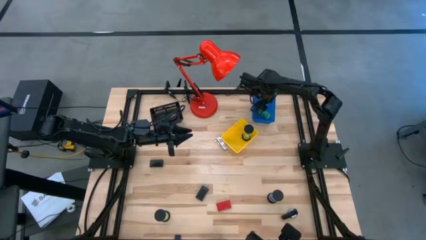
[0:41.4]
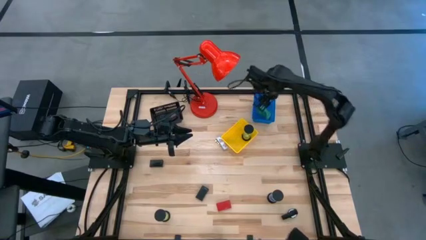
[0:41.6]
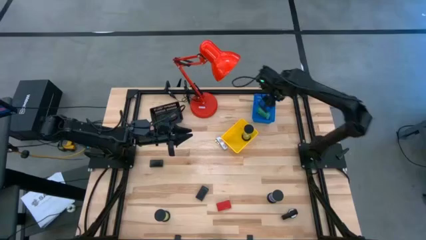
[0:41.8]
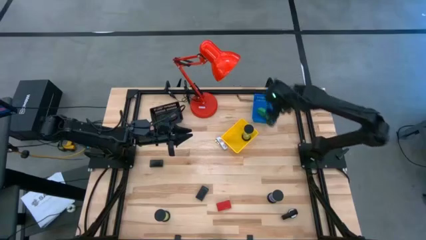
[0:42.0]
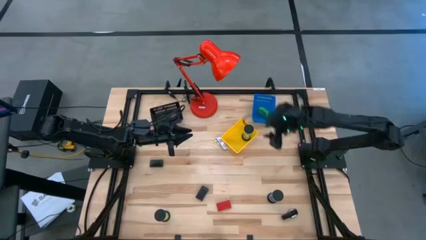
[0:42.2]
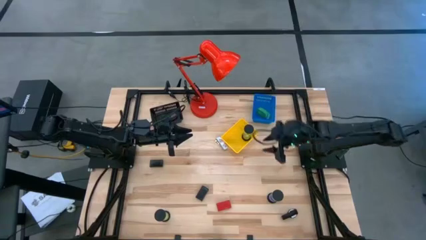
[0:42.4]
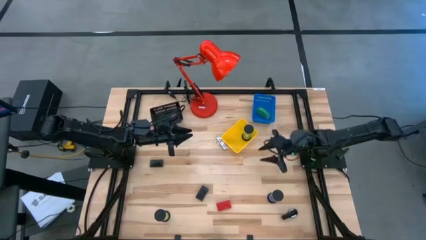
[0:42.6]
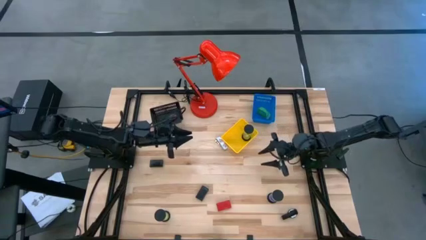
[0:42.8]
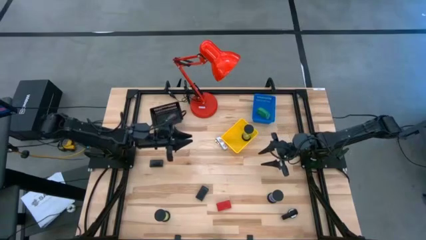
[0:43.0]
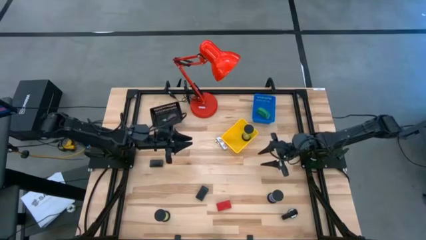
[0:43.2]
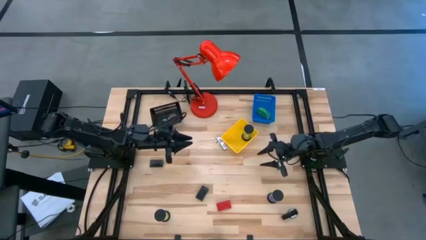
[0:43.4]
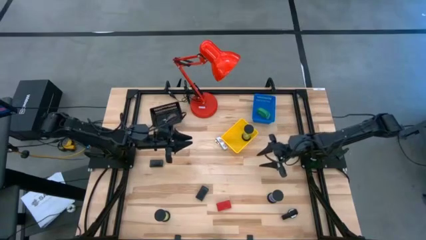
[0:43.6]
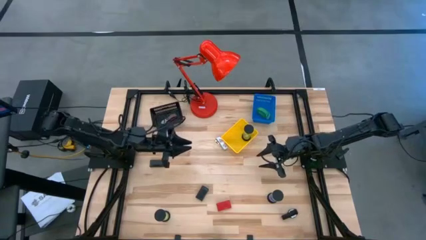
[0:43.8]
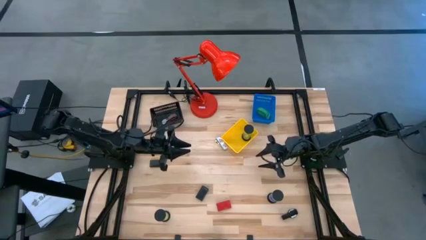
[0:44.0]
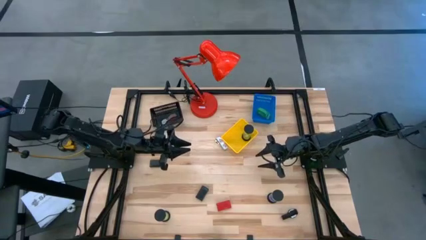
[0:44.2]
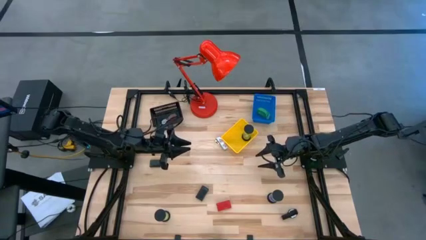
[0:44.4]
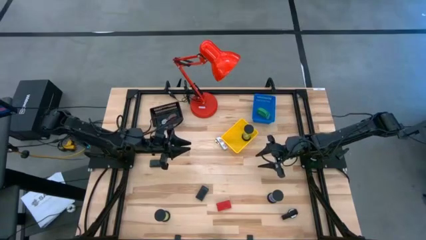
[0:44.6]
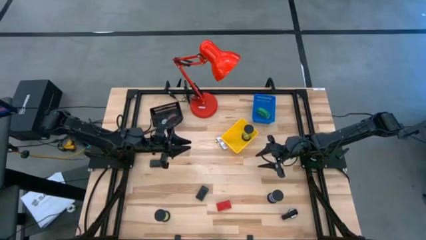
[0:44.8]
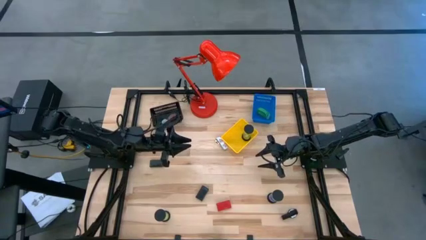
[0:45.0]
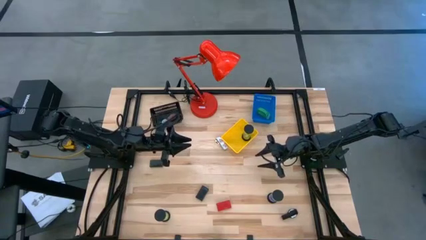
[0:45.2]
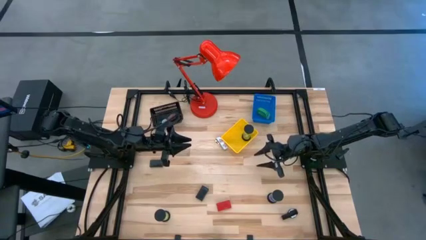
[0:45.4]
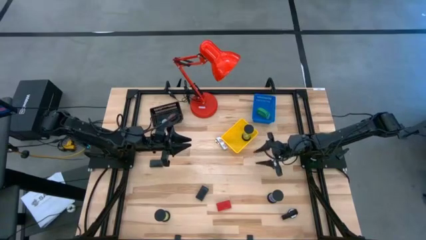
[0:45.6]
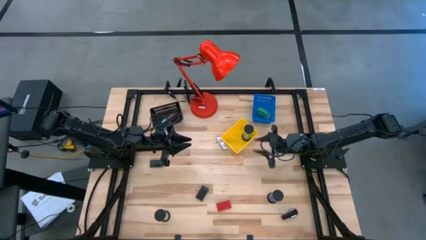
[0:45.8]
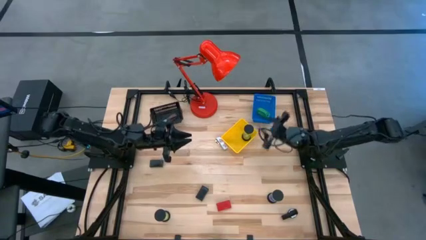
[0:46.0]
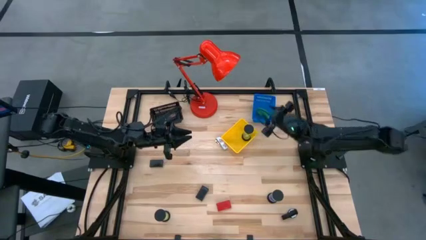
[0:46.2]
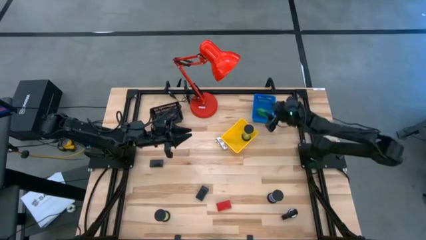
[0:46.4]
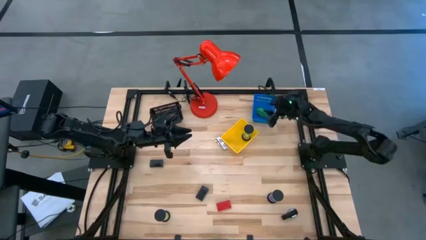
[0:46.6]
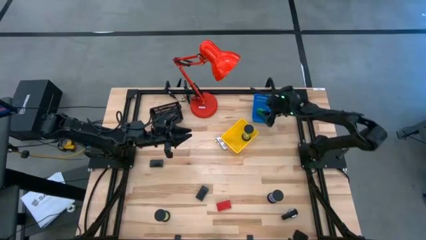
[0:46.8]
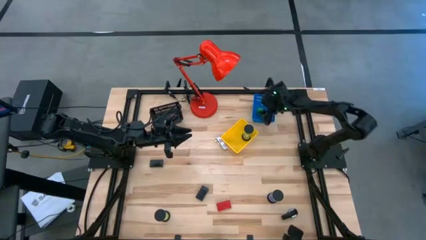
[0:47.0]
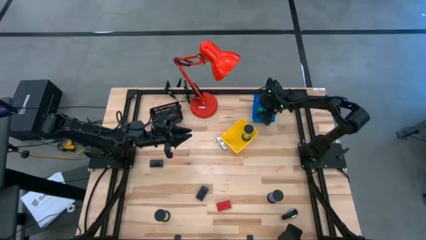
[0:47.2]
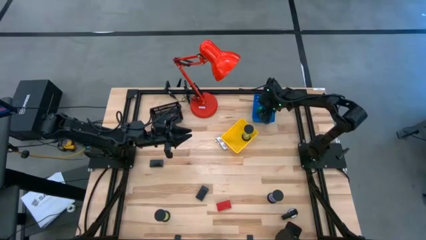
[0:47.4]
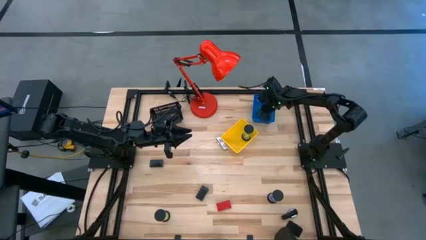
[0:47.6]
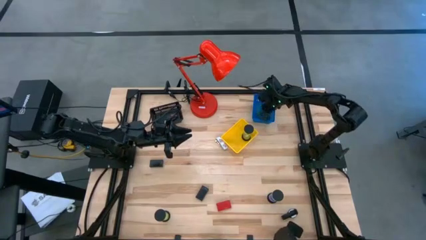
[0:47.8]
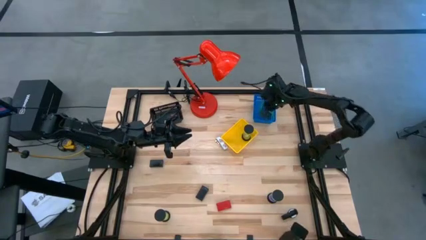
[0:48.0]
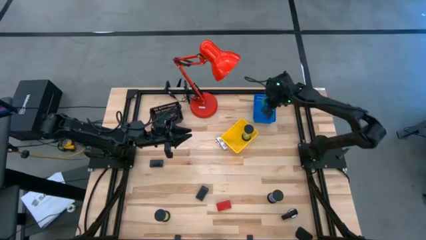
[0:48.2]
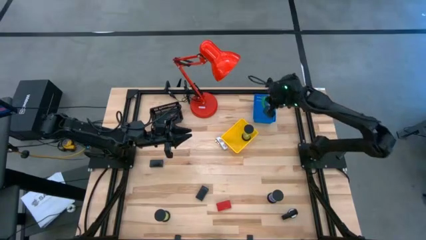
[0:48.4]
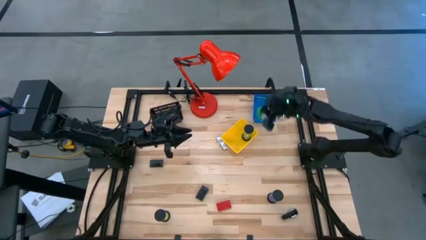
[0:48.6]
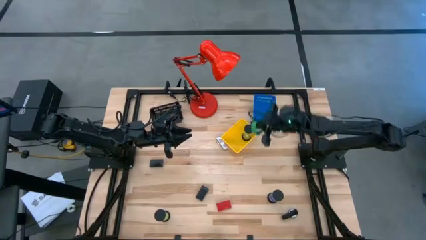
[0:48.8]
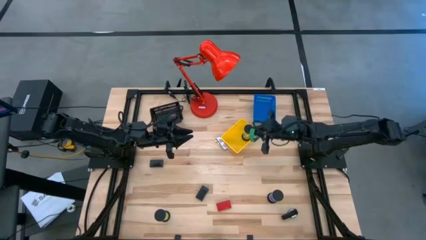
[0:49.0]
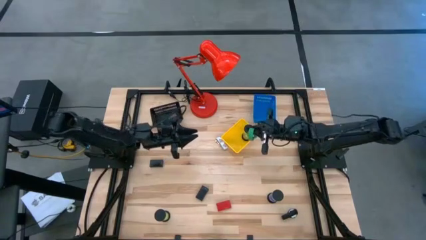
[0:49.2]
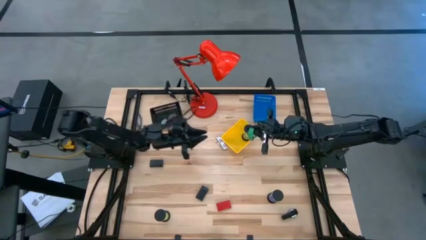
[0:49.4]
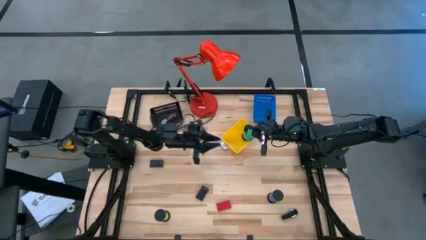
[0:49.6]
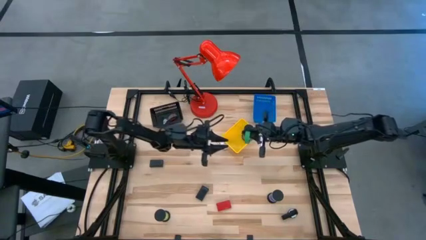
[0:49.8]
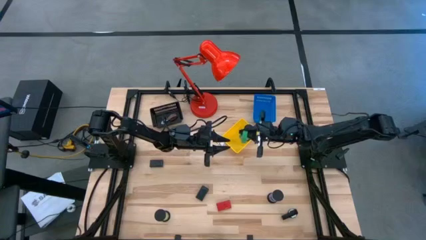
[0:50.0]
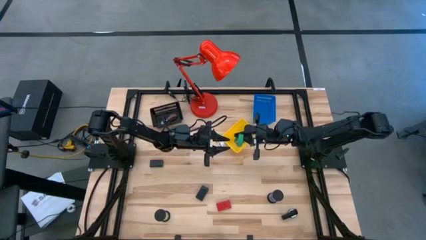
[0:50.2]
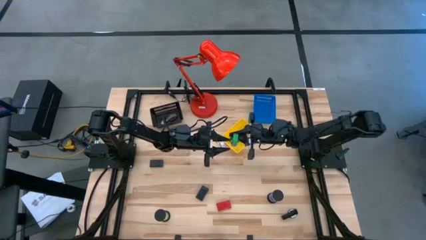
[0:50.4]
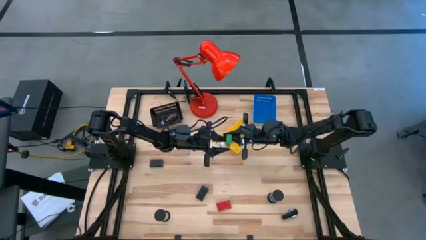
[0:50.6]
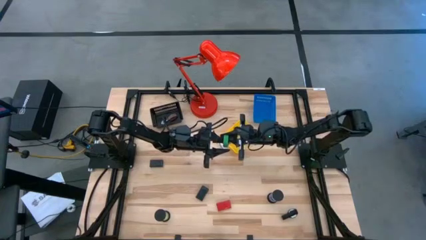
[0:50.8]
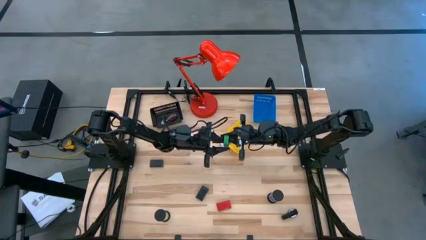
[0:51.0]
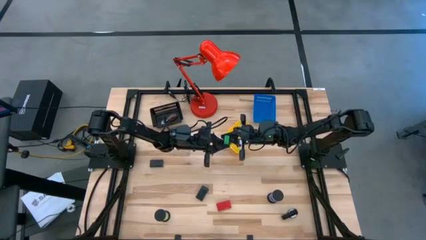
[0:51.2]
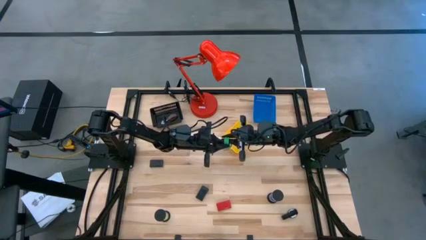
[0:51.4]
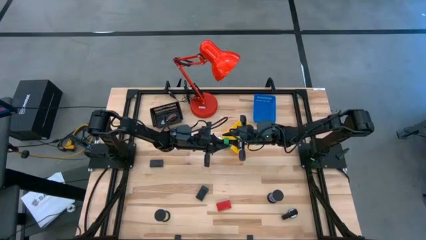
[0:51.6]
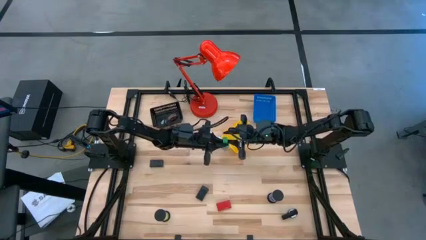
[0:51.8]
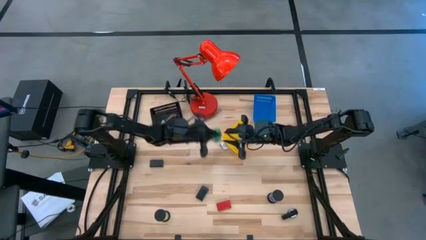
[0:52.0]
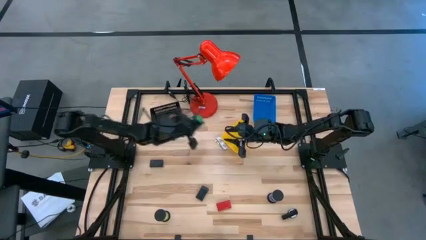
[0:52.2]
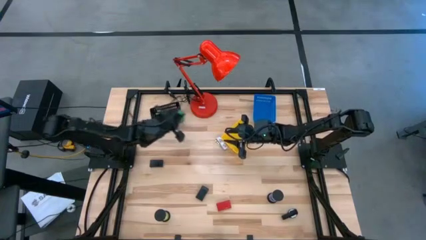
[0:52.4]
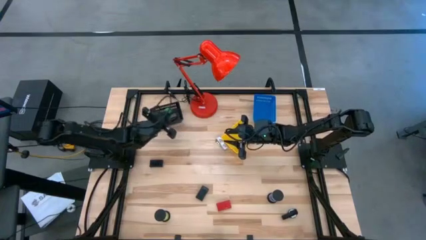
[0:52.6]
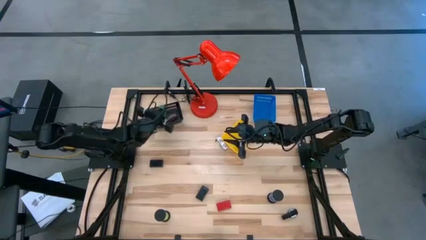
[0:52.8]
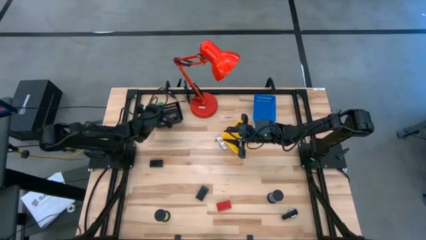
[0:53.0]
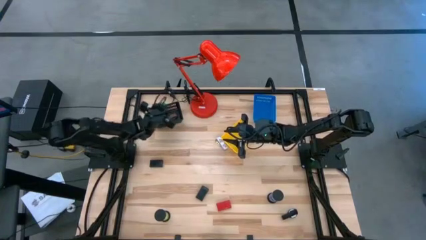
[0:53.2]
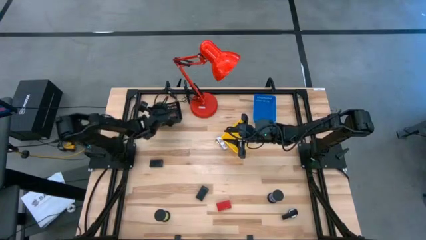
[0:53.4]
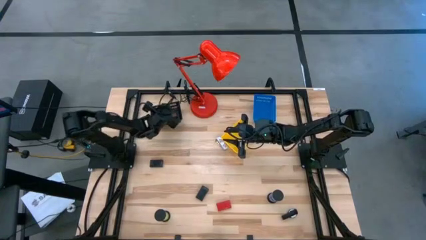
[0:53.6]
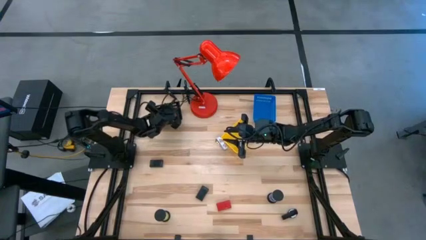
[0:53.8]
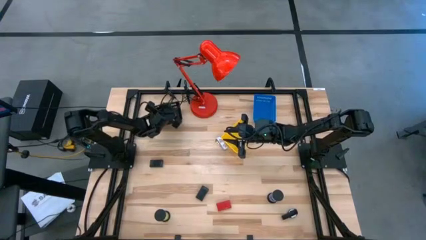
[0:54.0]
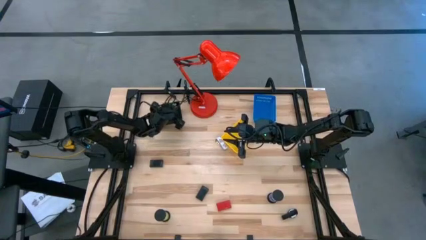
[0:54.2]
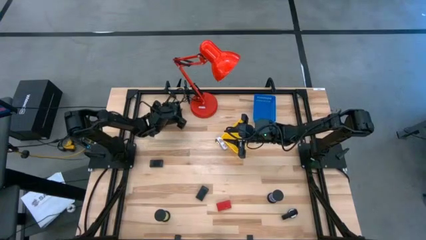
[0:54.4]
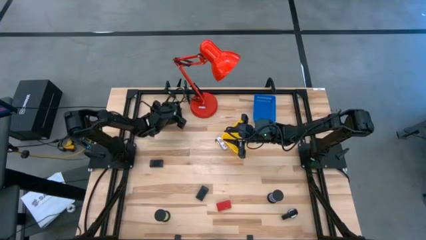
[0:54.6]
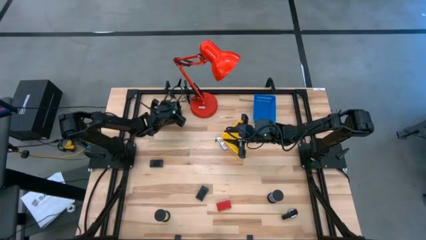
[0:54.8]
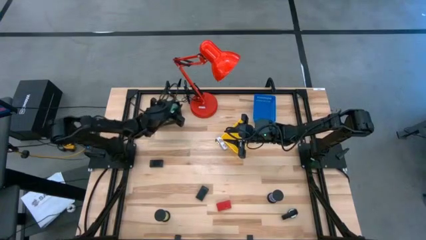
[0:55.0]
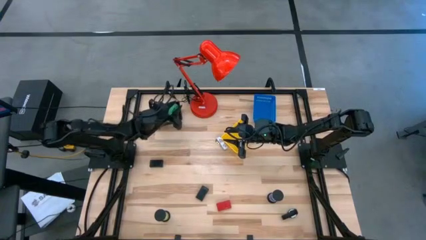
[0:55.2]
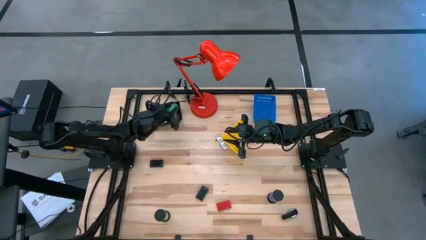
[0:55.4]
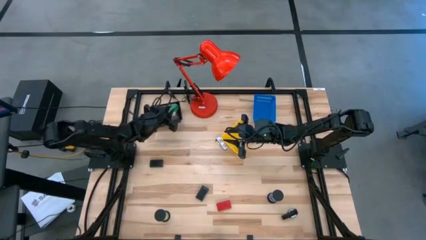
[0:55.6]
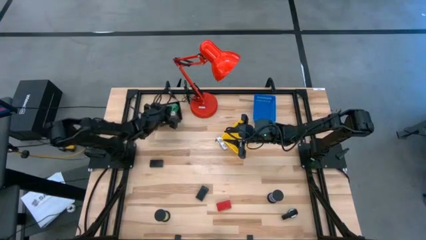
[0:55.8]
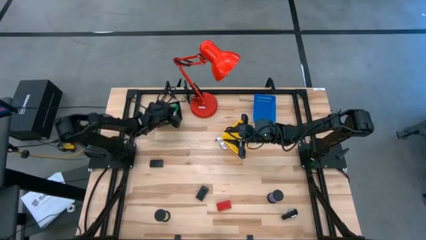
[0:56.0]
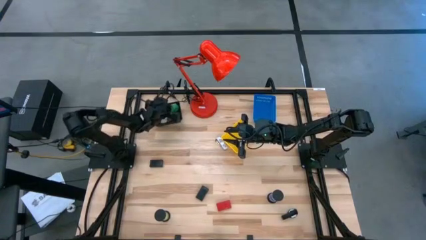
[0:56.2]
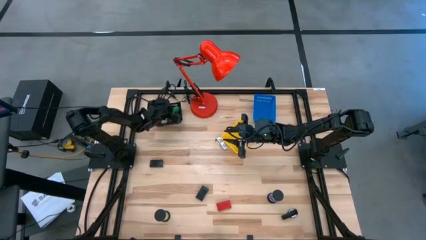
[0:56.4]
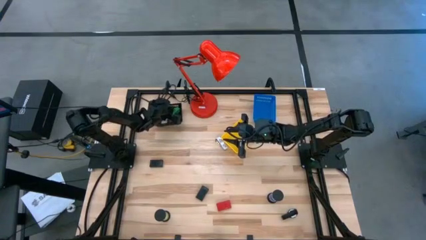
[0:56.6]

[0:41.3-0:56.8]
Task: Pick & Place Office items
Put the green wrist watch into the black bin
